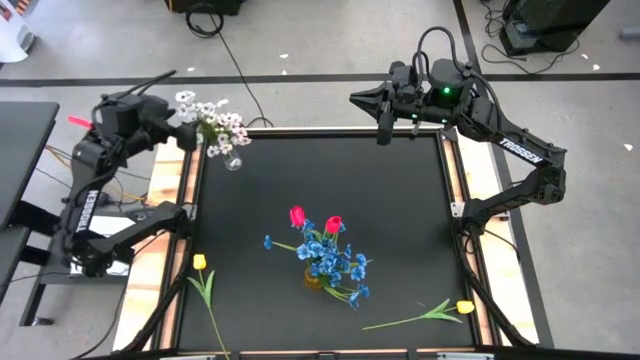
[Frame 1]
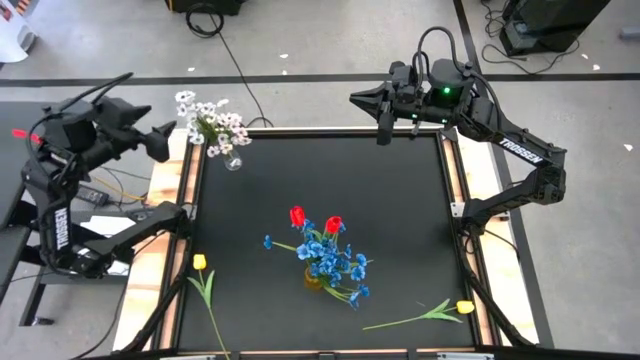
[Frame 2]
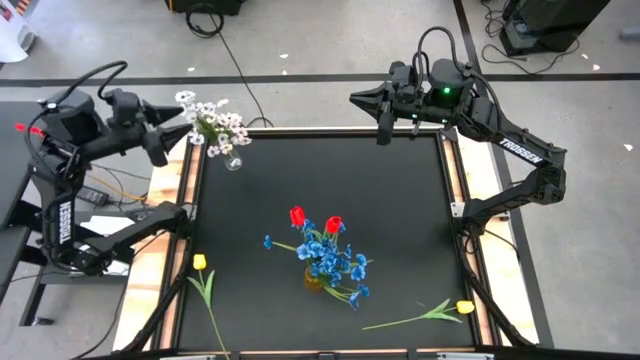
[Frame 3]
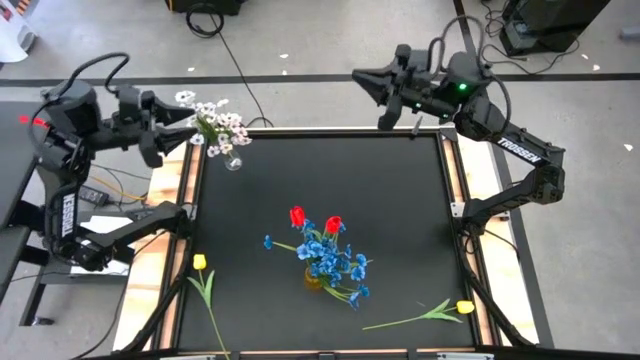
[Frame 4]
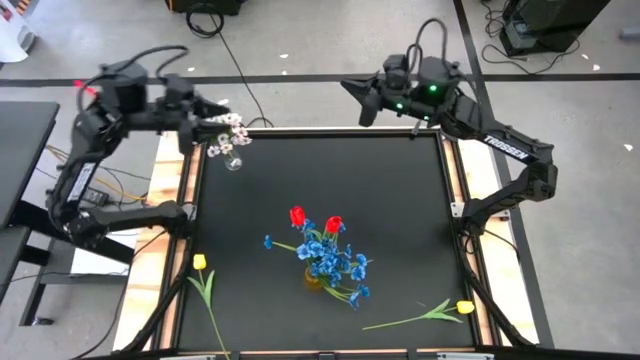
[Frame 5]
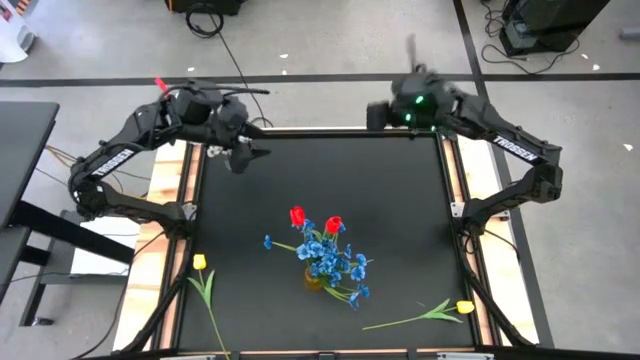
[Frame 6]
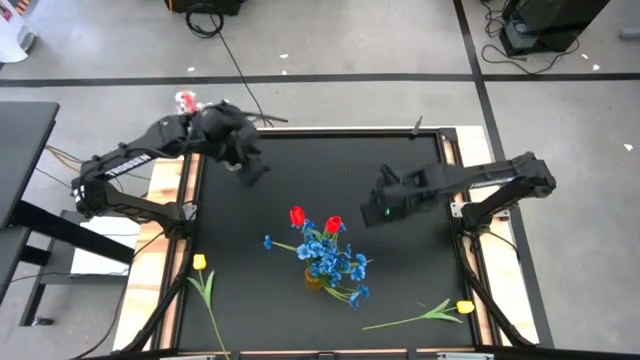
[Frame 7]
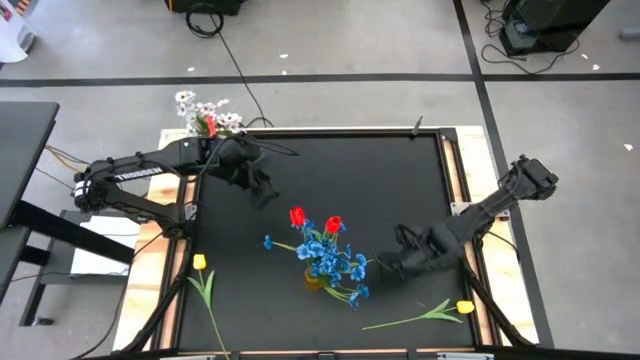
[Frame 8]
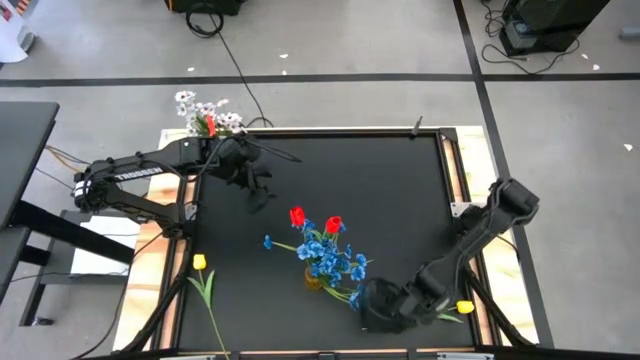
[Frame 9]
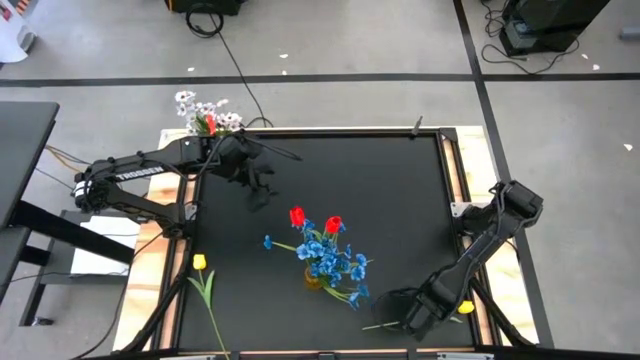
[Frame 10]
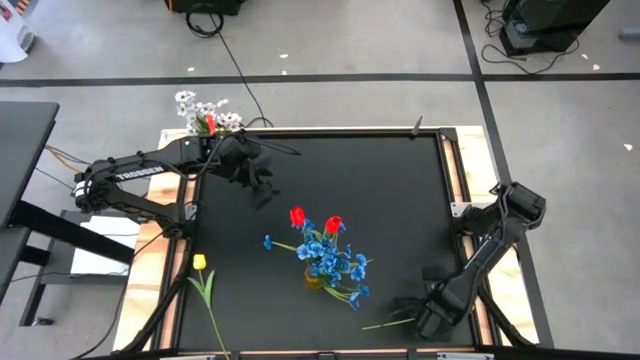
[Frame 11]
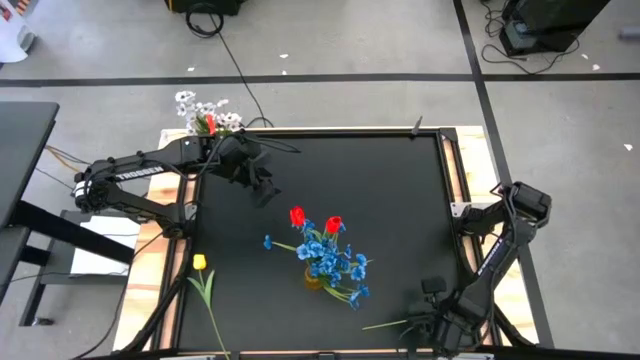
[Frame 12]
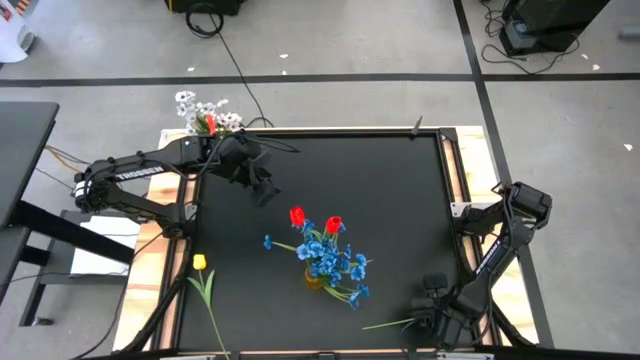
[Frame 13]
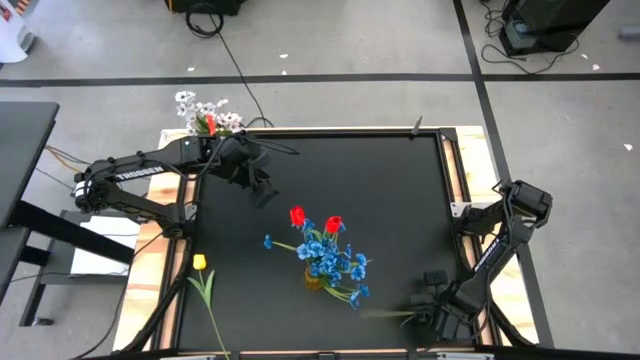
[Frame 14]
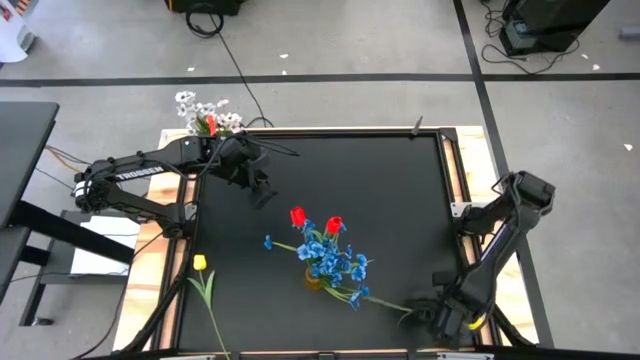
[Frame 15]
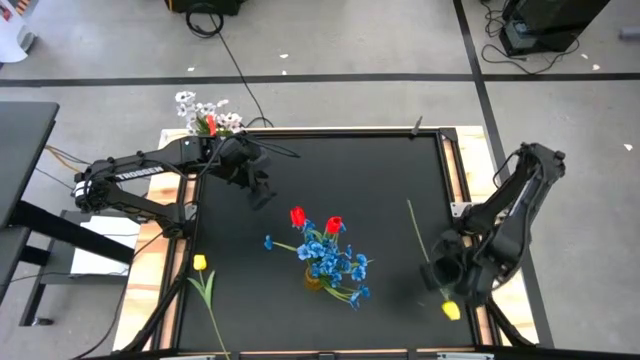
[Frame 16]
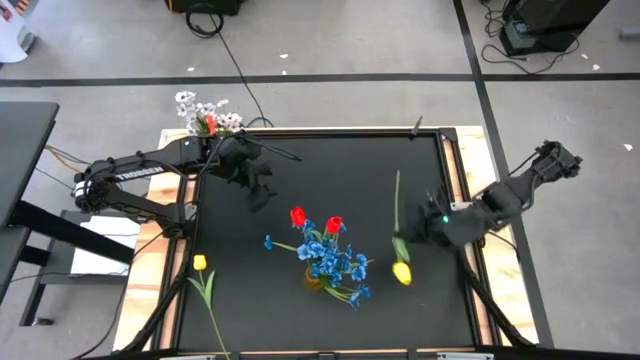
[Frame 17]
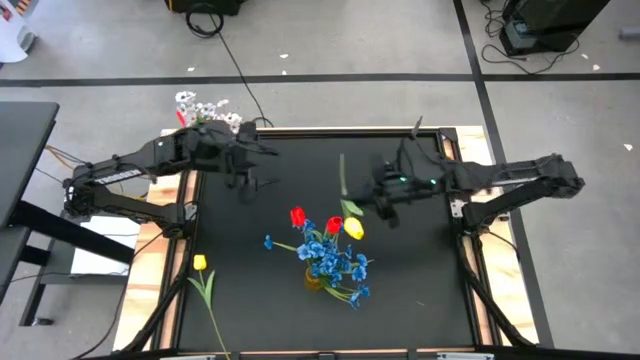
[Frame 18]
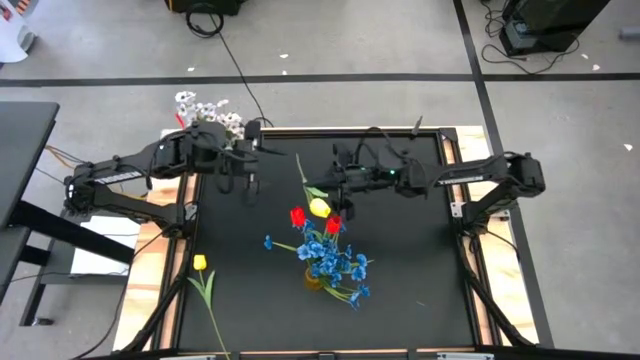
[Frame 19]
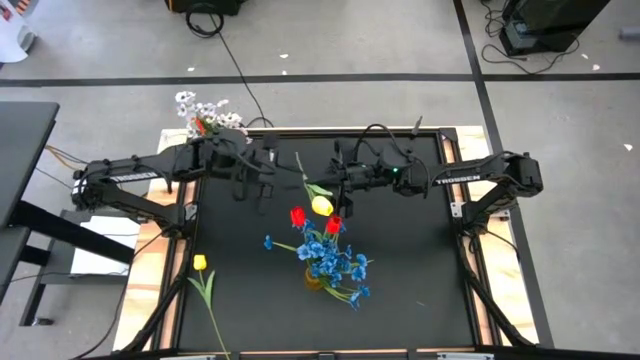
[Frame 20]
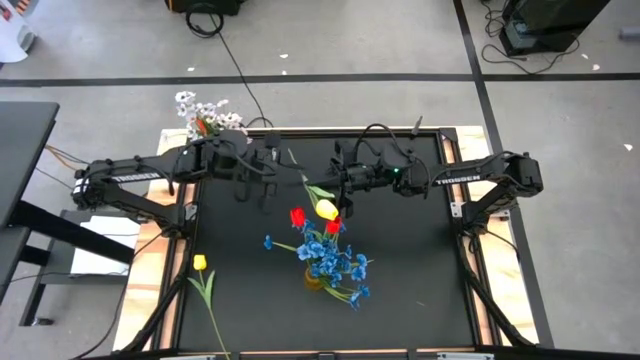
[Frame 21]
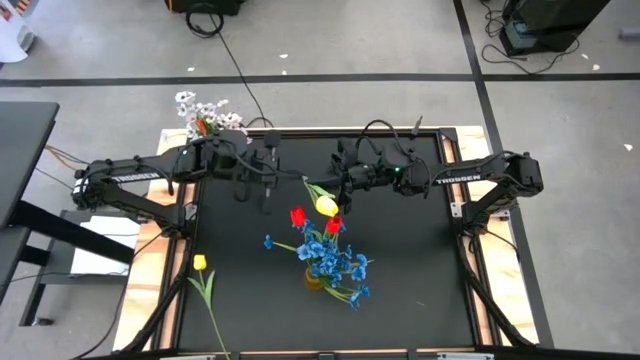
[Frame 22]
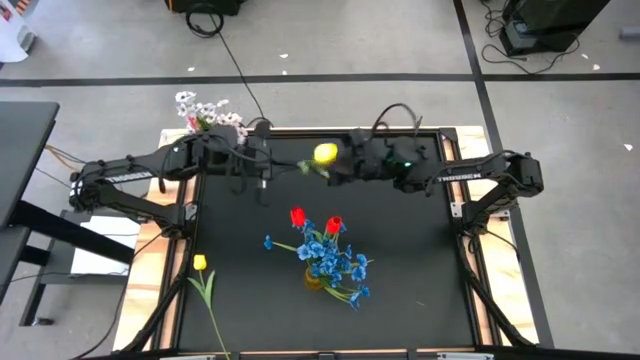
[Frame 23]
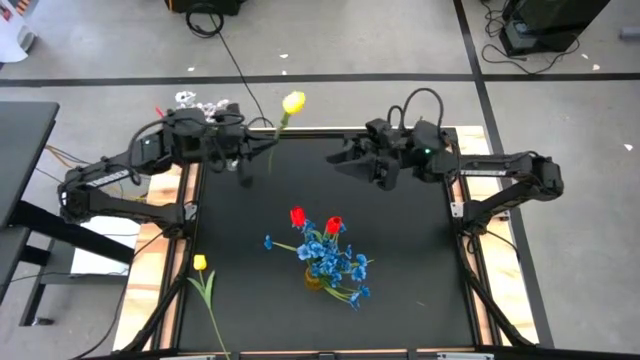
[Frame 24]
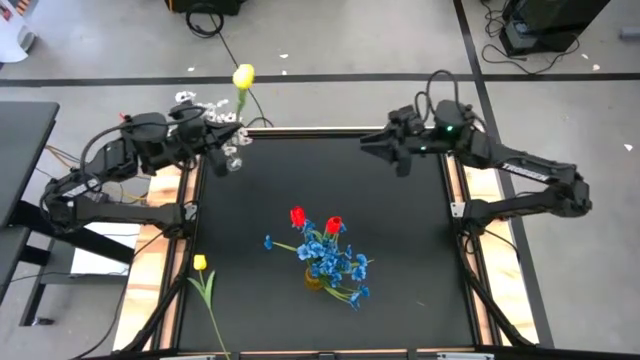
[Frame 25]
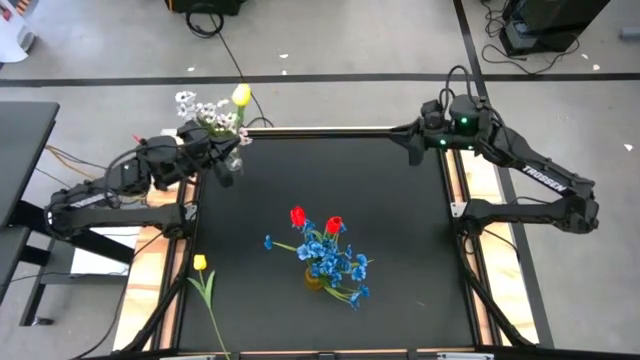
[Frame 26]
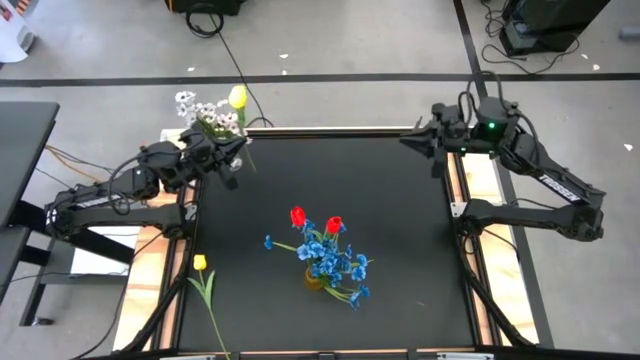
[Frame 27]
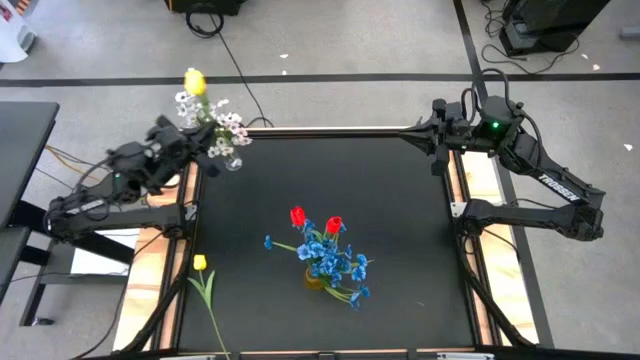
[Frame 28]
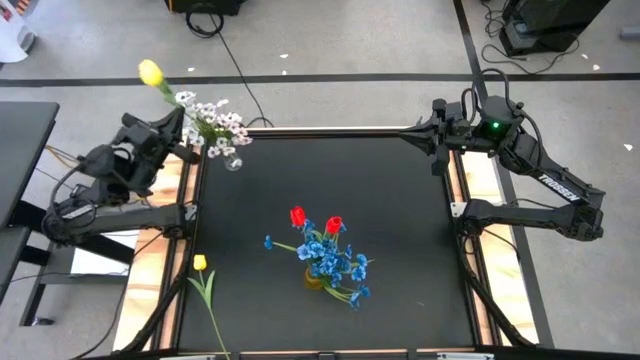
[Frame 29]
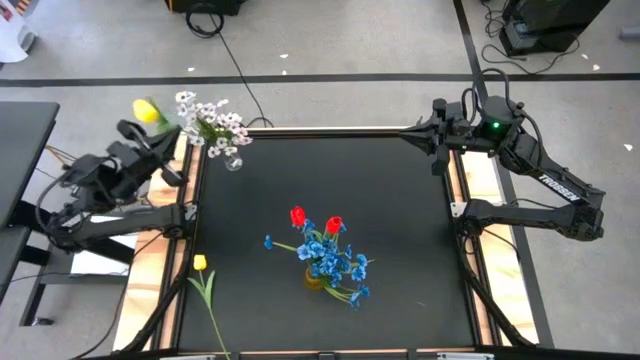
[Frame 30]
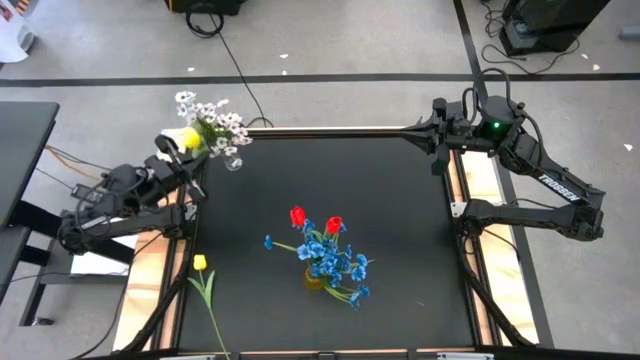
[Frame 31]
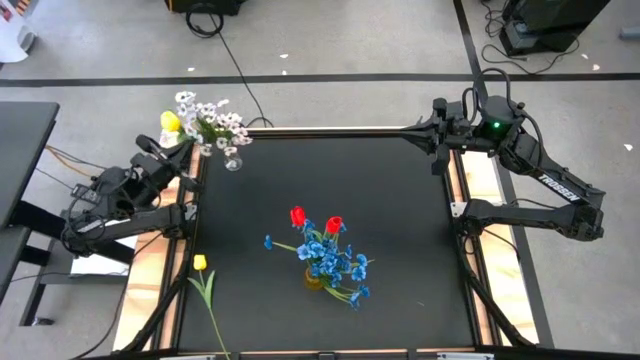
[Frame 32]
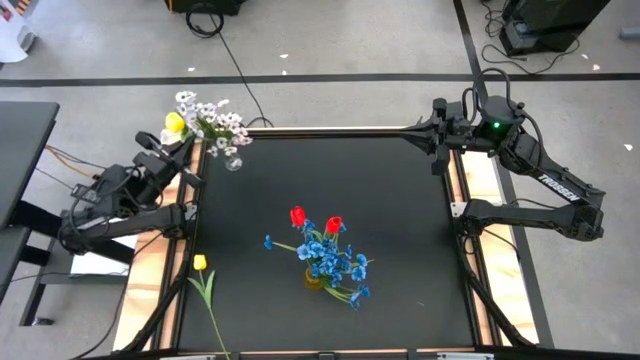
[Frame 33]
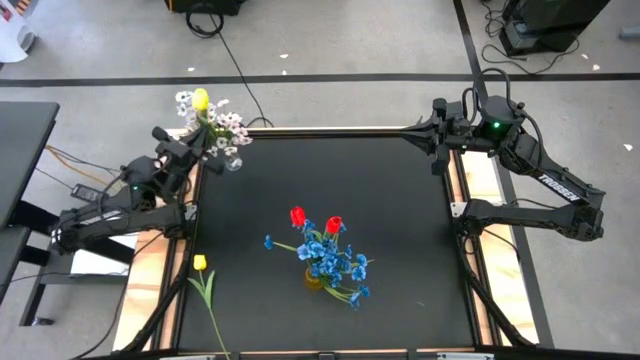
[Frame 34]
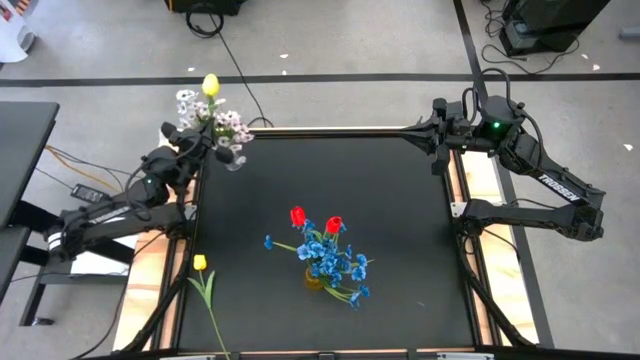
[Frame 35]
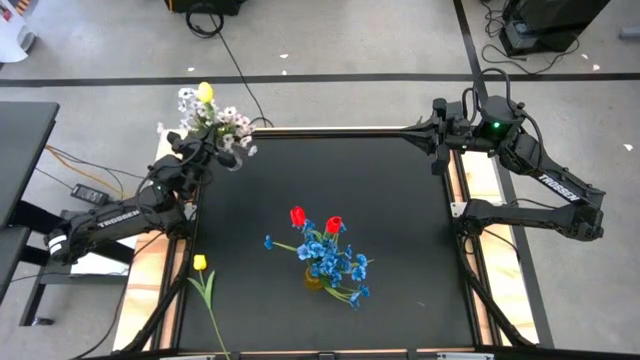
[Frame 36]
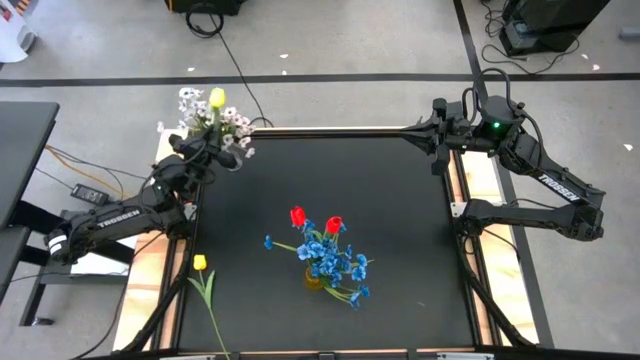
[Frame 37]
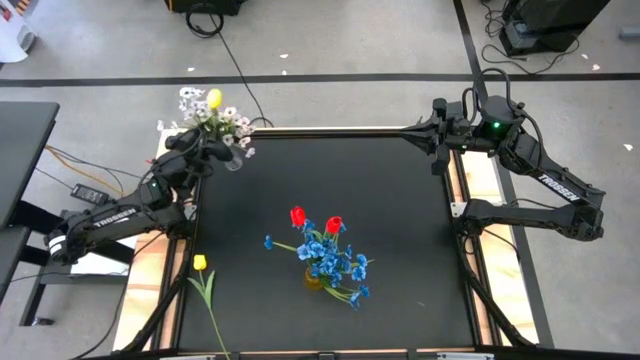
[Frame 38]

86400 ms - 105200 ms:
Task: Sort flowers into vase by color
Put the right yellow flower into the transparent vase

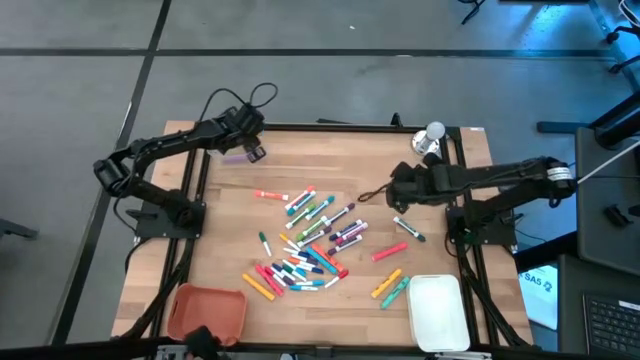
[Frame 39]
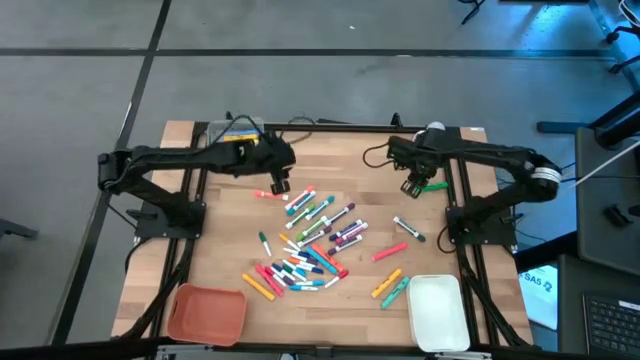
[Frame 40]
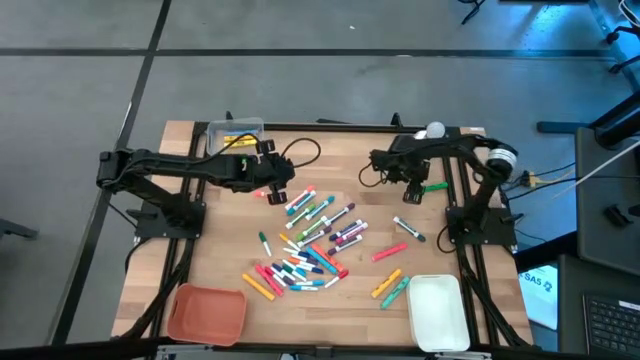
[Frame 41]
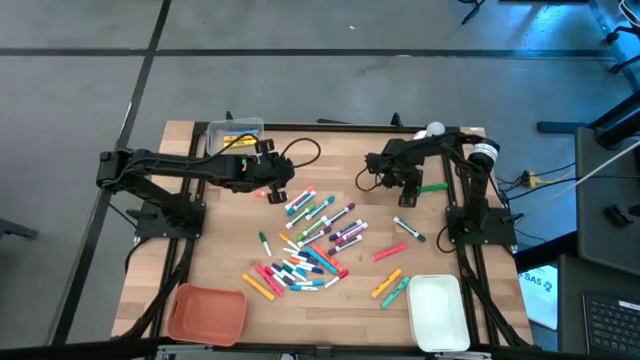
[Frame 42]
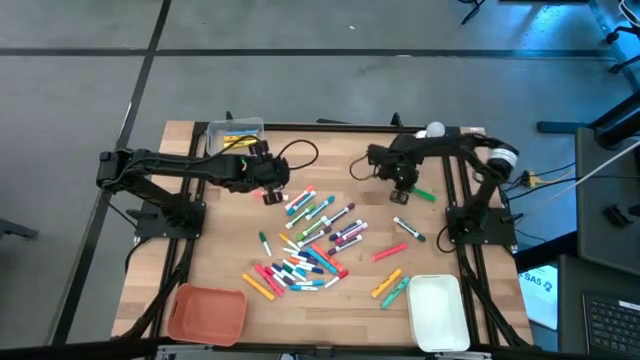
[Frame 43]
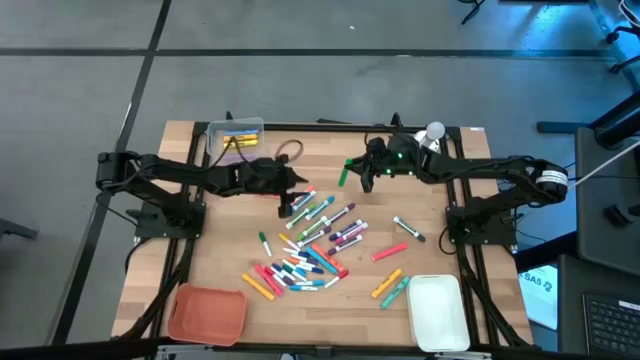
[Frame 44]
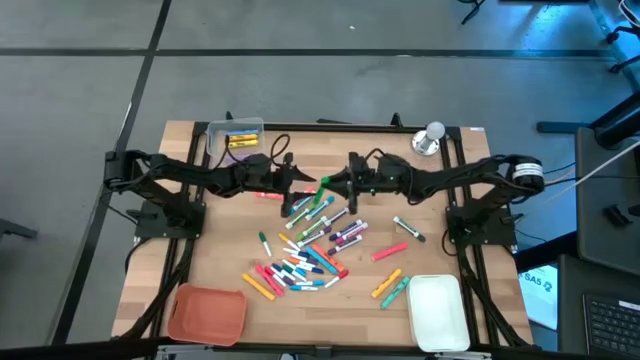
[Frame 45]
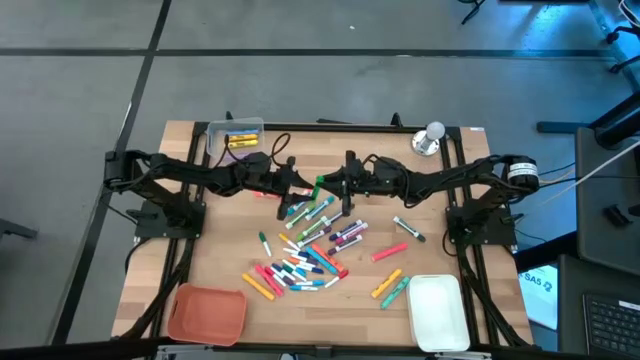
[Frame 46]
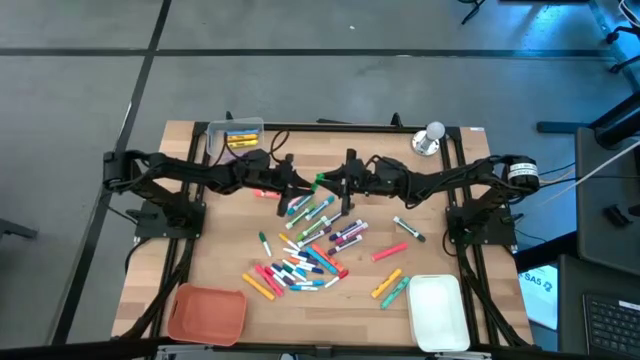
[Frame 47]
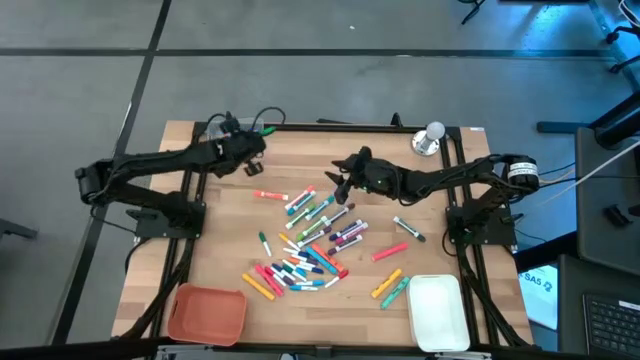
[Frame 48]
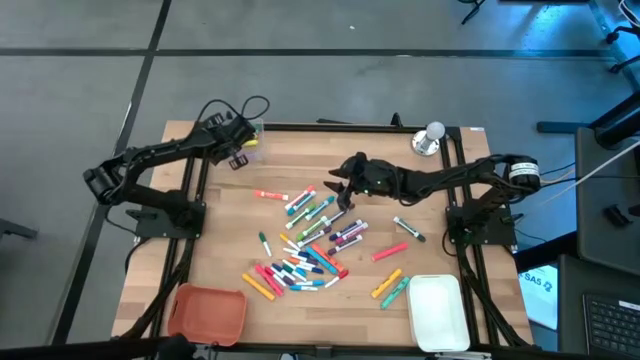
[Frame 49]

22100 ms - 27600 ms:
Task: Pick & Place Markers
Put the green pen into the transparent bin
